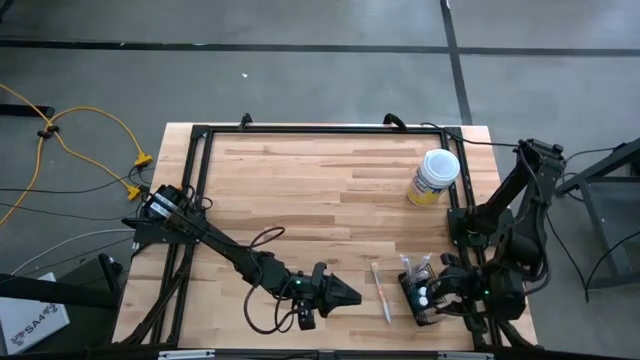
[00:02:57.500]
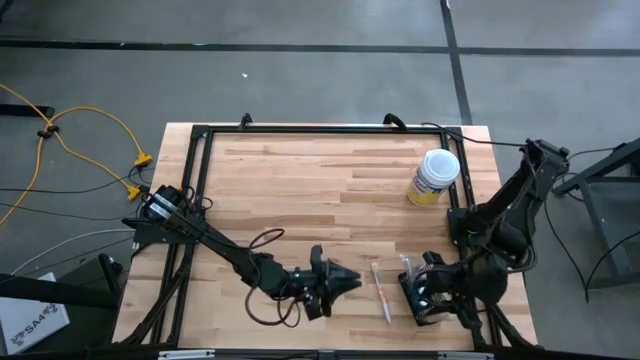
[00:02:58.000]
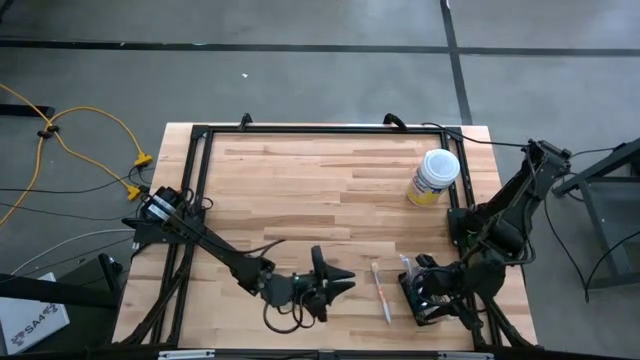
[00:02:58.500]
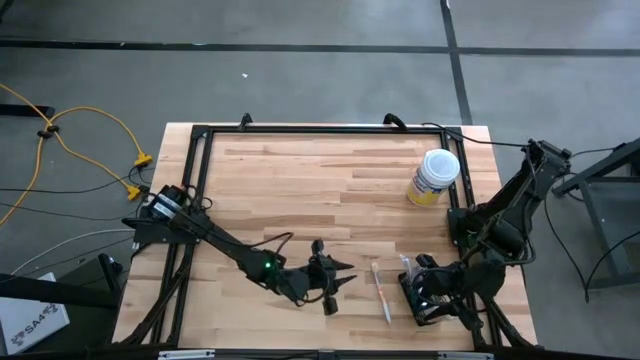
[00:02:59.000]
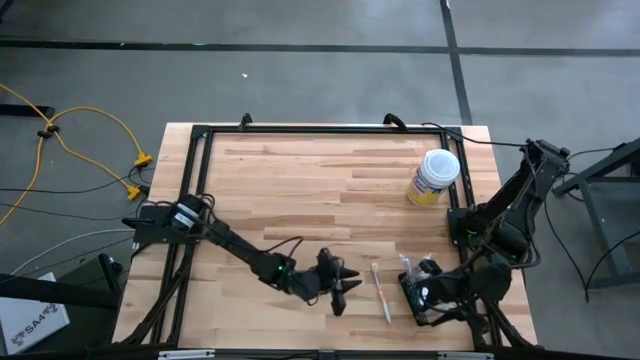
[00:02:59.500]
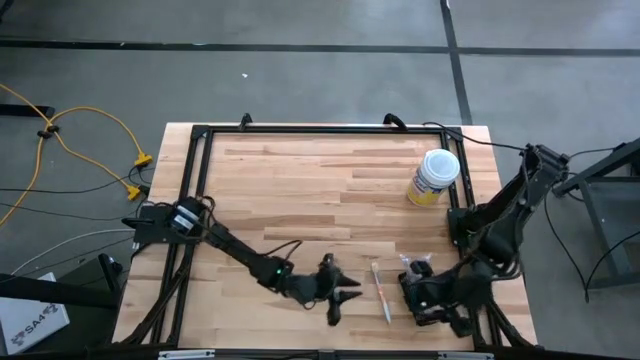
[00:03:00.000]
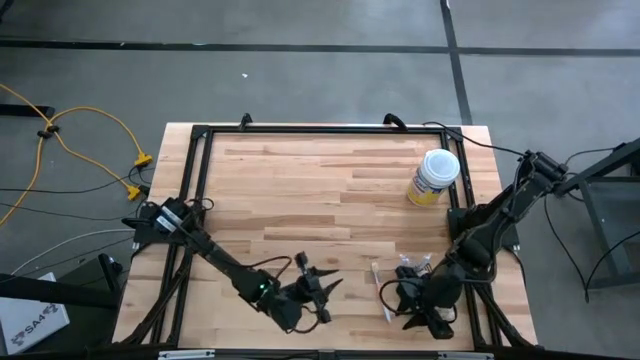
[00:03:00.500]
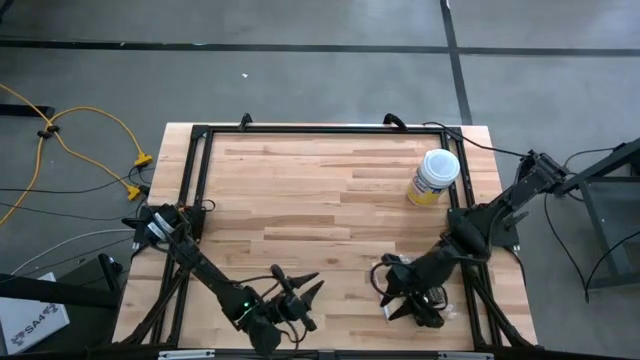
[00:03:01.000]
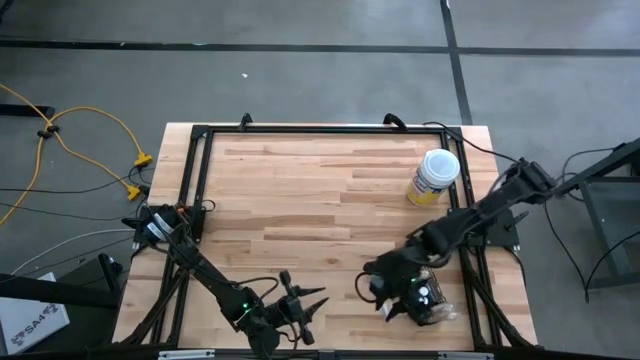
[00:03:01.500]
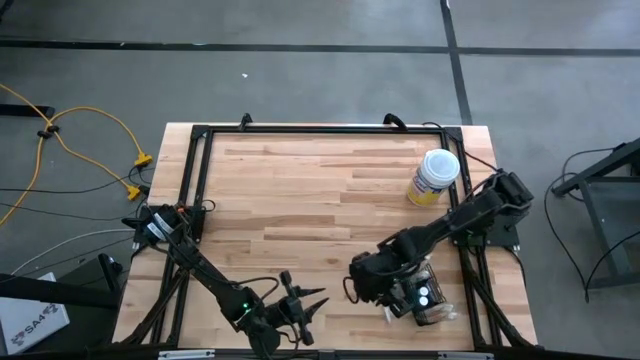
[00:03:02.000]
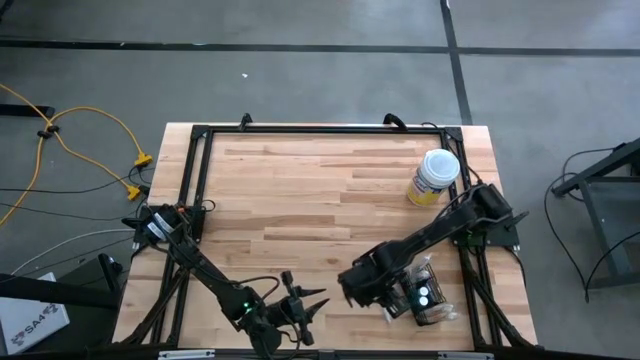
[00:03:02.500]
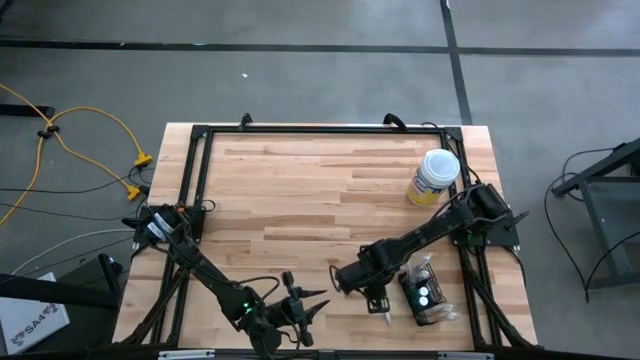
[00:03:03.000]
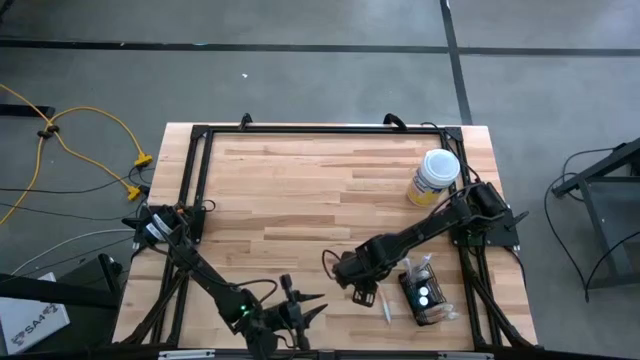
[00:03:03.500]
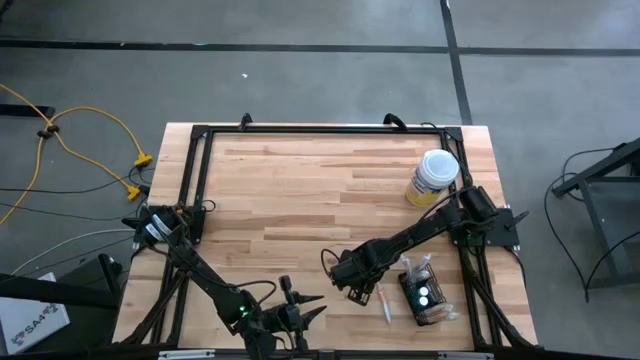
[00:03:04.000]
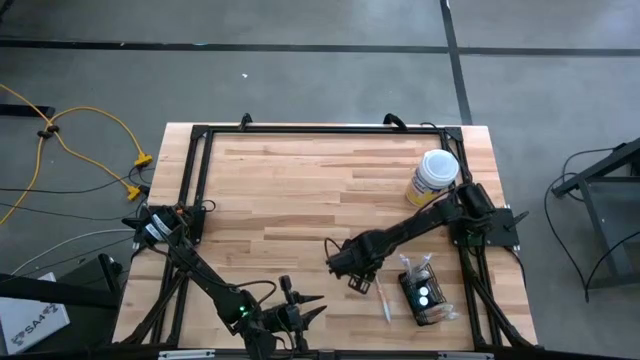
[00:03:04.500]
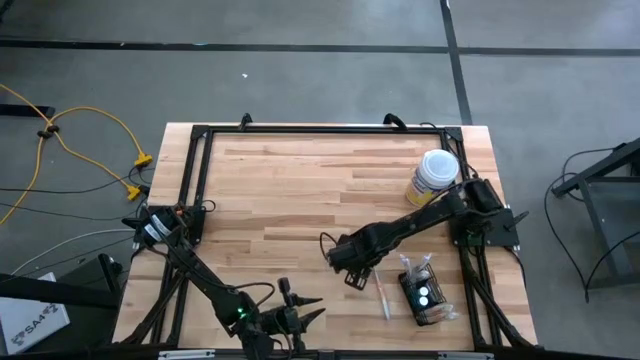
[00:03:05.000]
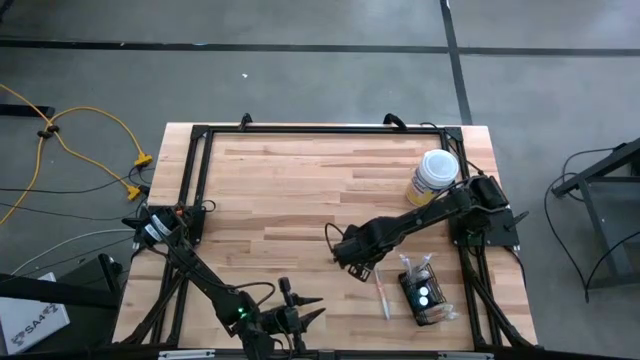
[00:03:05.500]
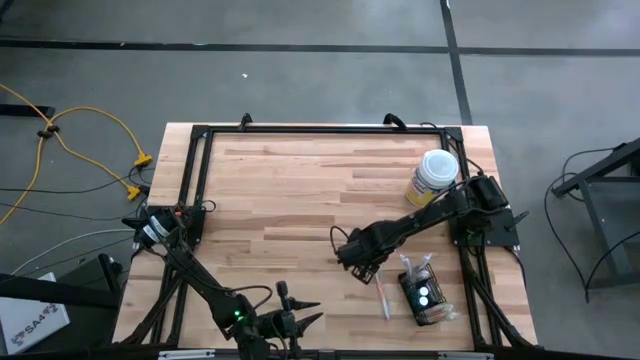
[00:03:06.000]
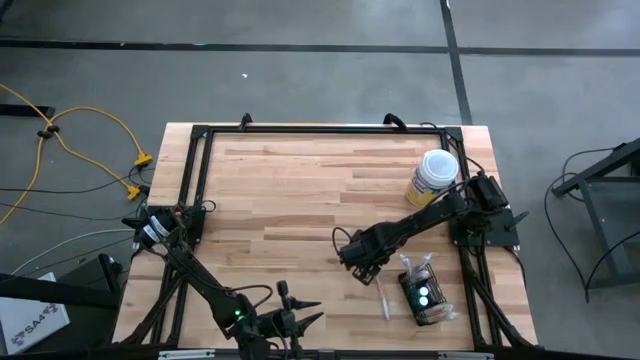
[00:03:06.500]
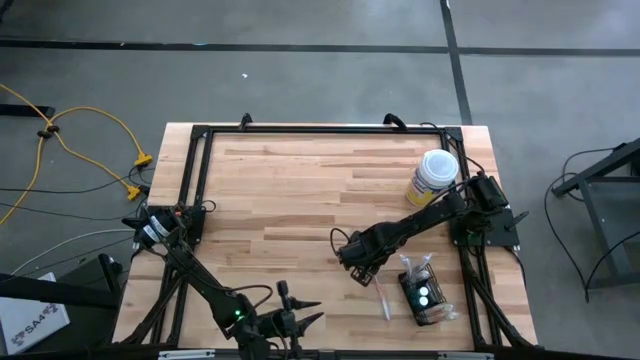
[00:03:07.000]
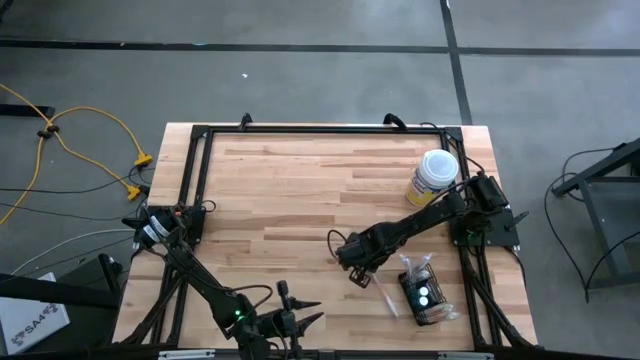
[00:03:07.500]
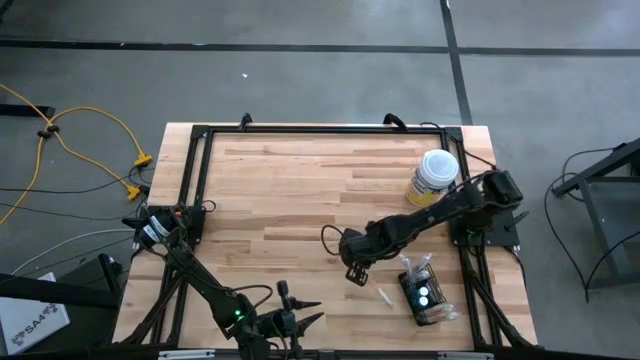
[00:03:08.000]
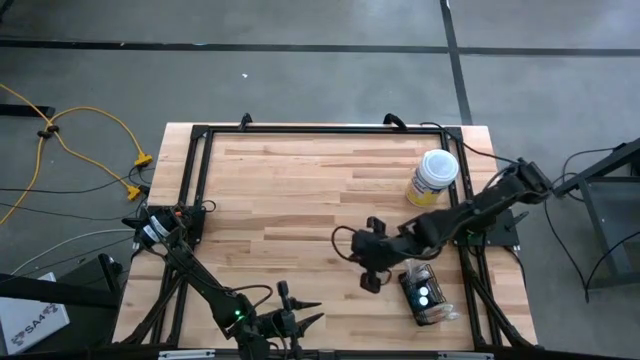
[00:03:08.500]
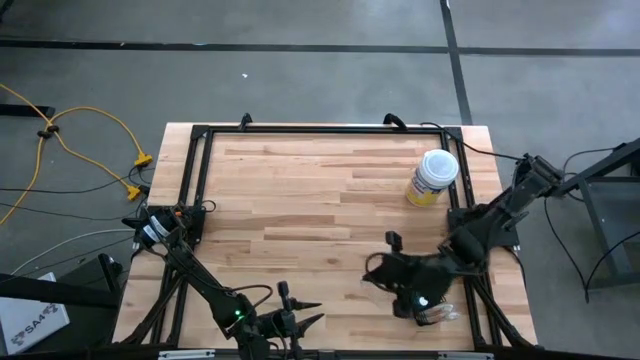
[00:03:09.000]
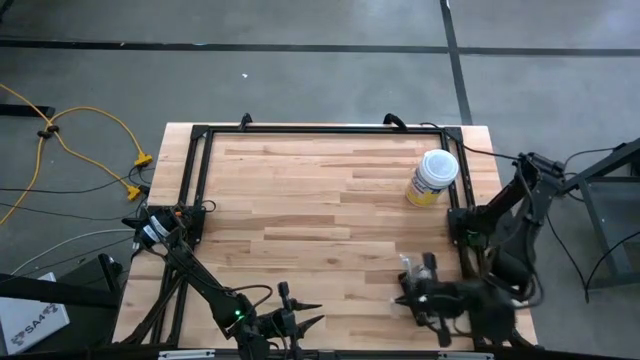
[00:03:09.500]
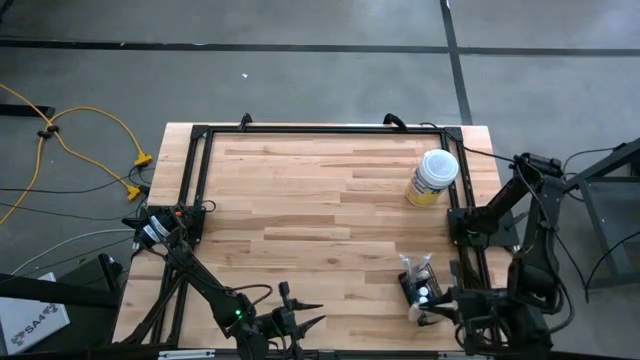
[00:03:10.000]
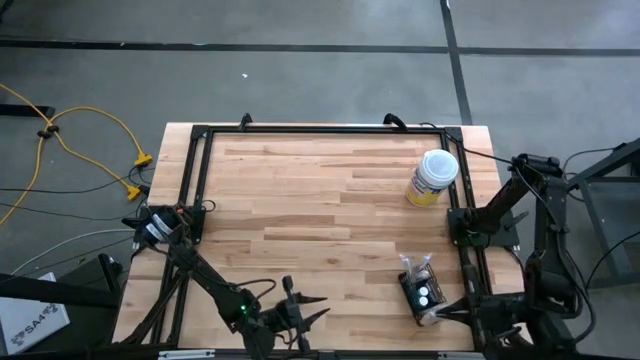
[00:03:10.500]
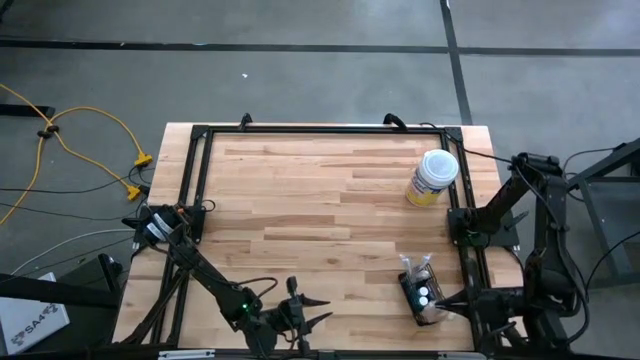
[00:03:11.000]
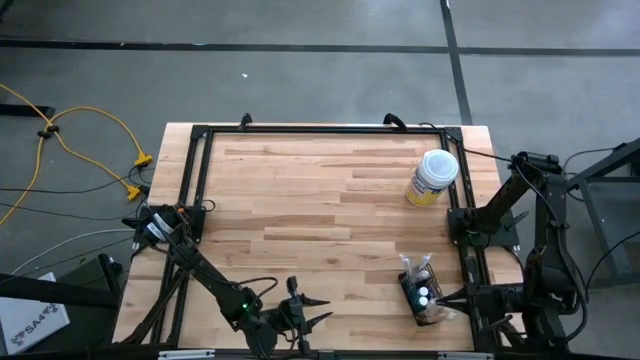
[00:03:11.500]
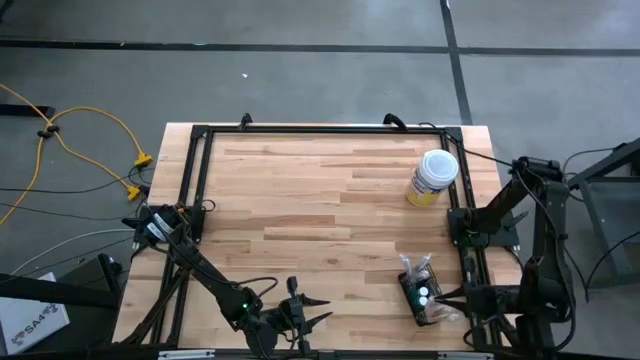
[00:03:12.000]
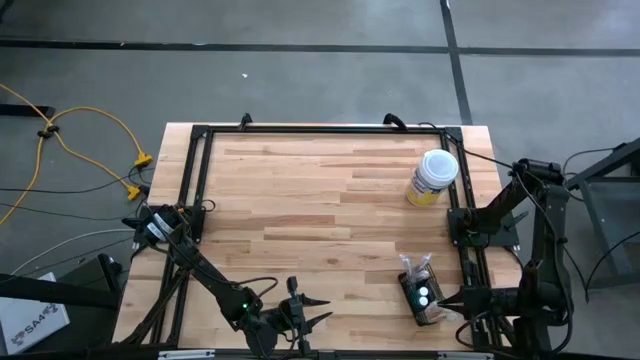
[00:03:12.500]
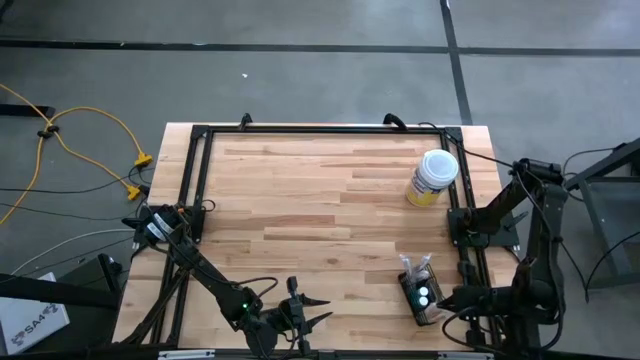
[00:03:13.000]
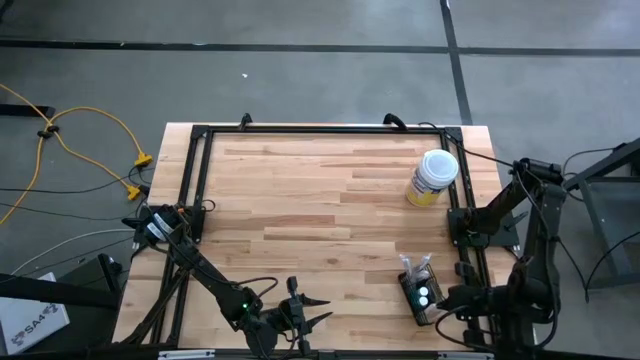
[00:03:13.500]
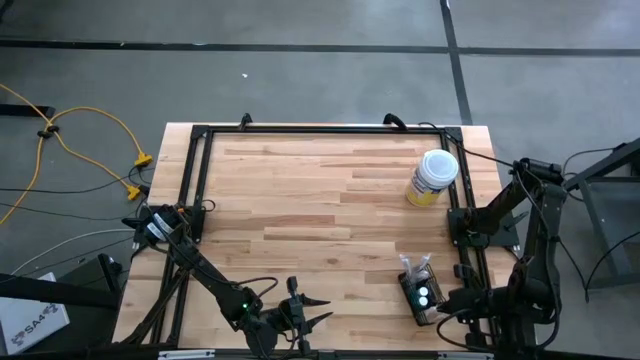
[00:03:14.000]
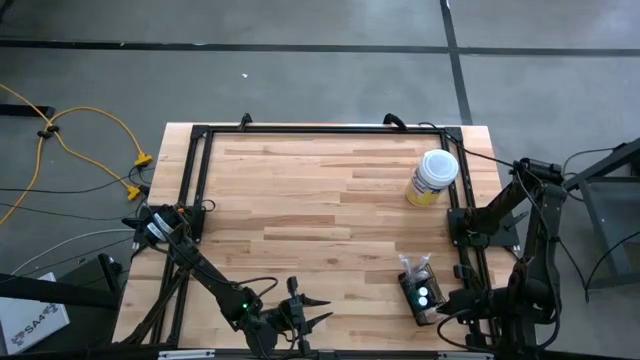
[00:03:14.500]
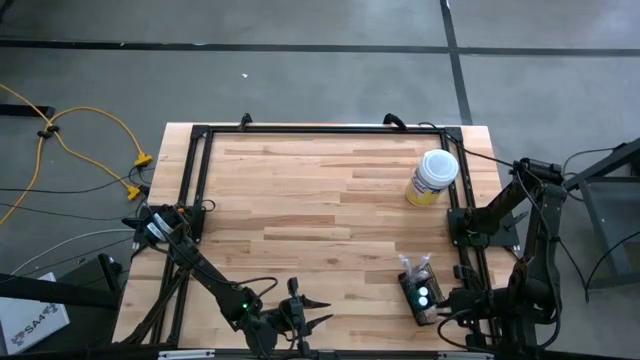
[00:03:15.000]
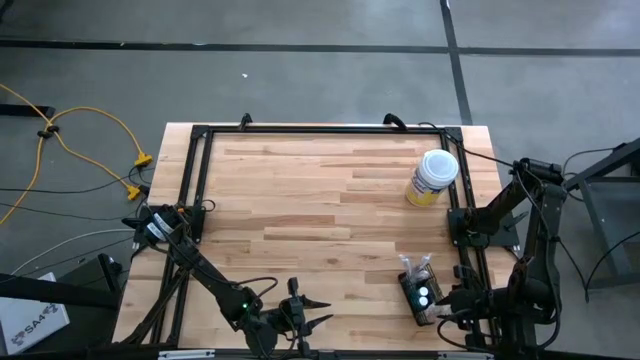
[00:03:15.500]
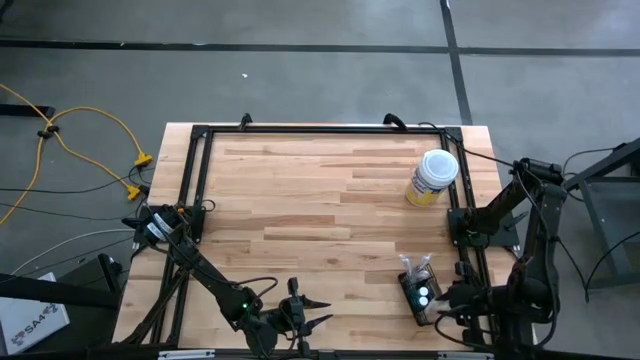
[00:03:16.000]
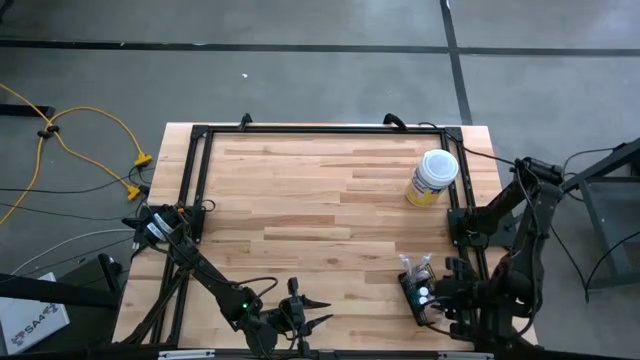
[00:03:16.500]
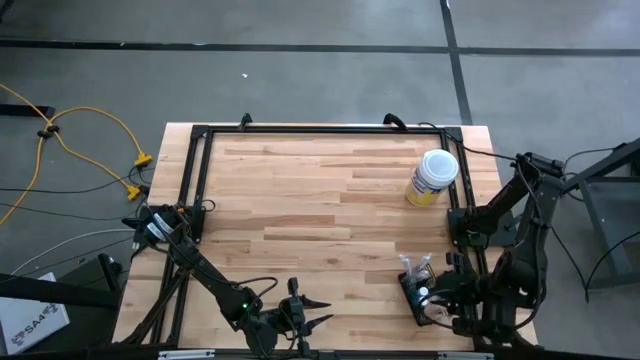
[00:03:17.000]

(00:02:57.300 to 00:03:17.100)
Task: Pick & Place toothbrushing station
Put the orange toothbrush into the mesh organizer
